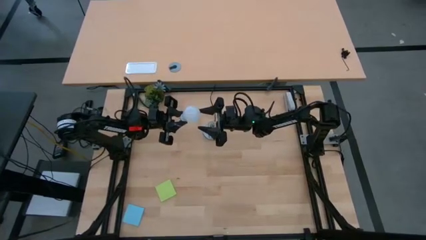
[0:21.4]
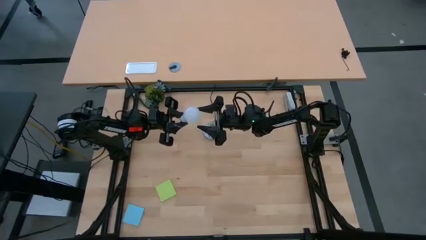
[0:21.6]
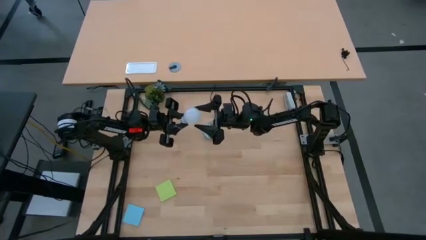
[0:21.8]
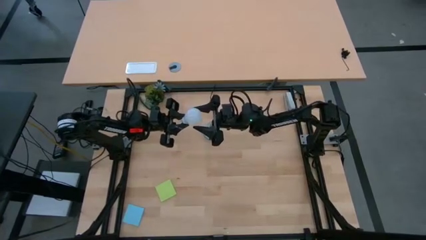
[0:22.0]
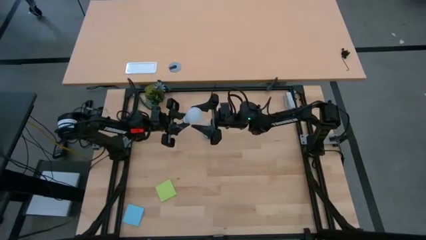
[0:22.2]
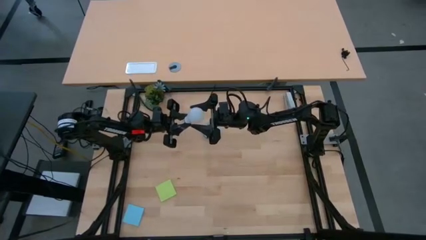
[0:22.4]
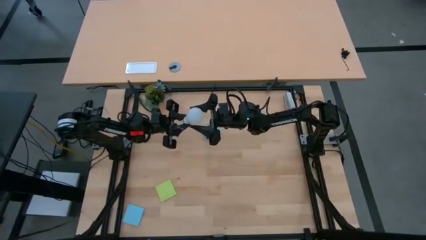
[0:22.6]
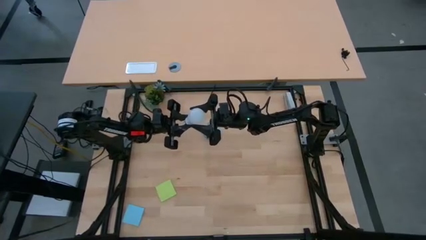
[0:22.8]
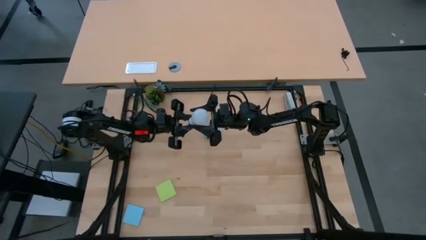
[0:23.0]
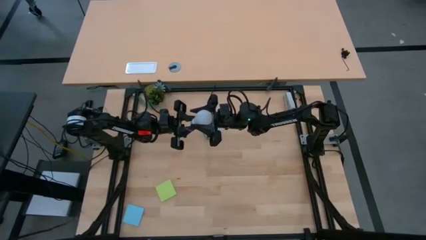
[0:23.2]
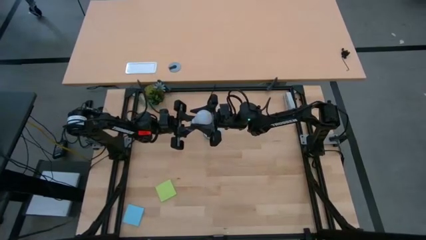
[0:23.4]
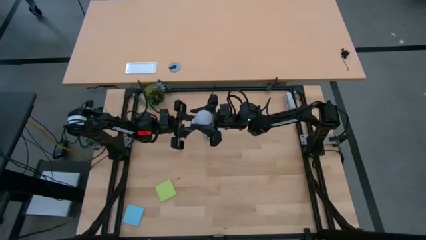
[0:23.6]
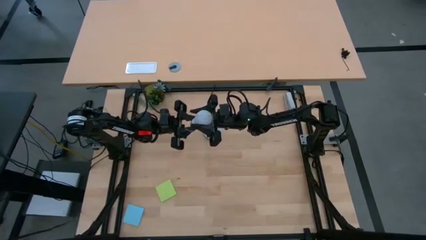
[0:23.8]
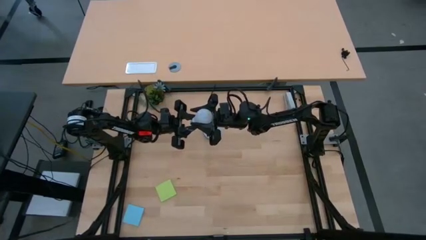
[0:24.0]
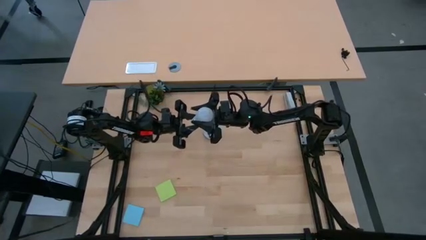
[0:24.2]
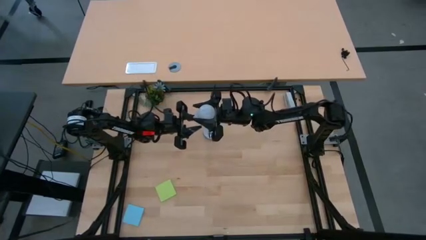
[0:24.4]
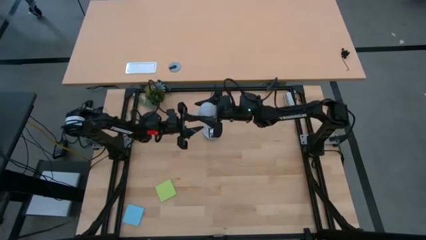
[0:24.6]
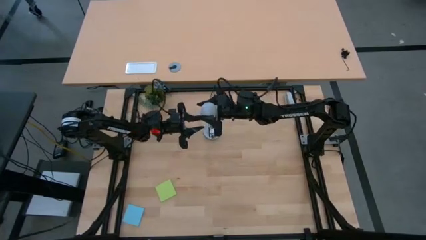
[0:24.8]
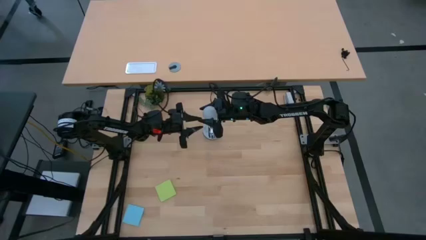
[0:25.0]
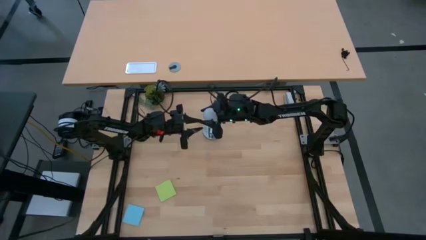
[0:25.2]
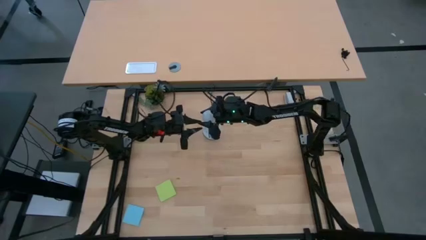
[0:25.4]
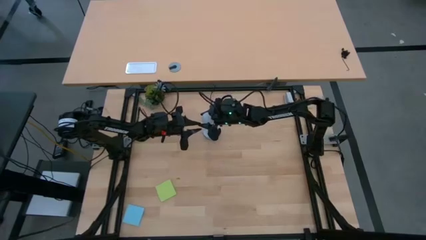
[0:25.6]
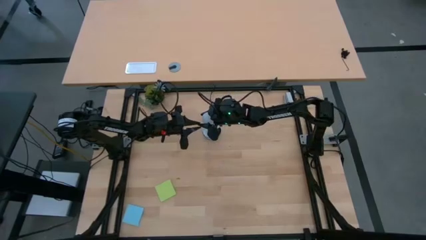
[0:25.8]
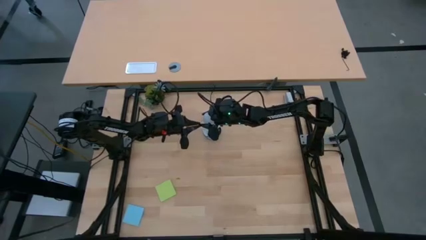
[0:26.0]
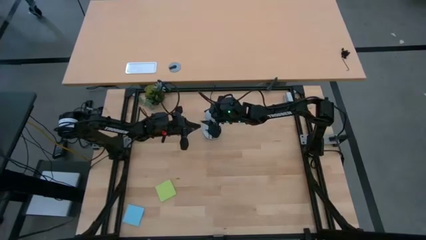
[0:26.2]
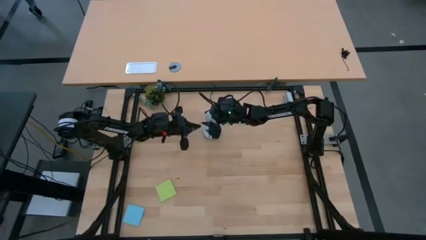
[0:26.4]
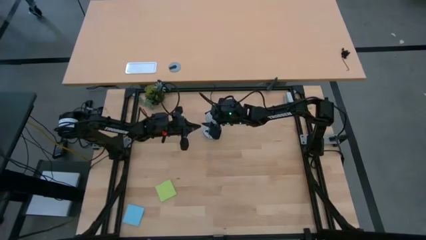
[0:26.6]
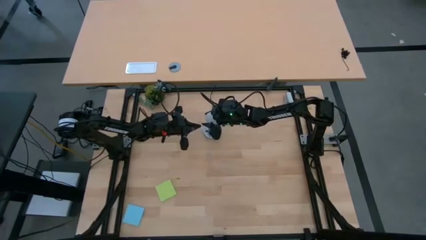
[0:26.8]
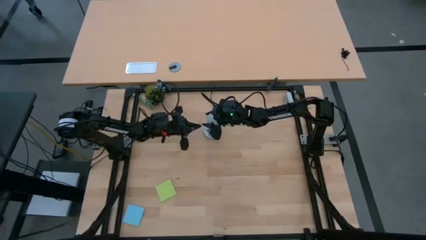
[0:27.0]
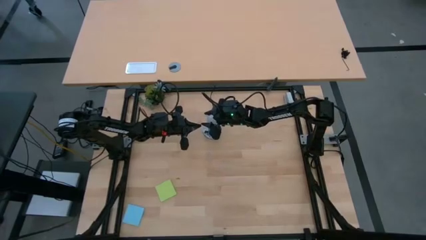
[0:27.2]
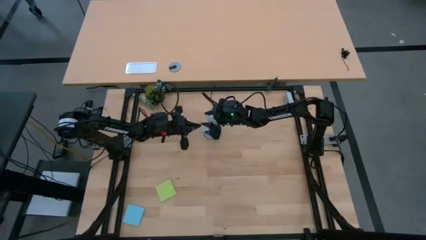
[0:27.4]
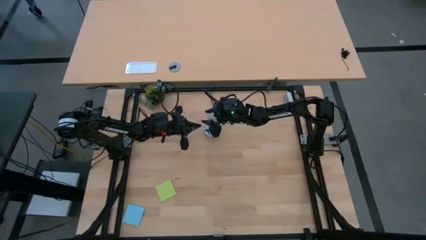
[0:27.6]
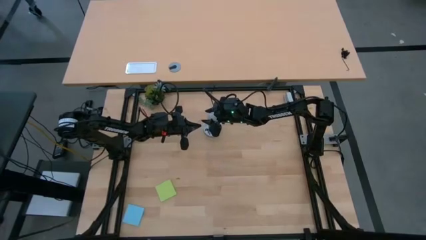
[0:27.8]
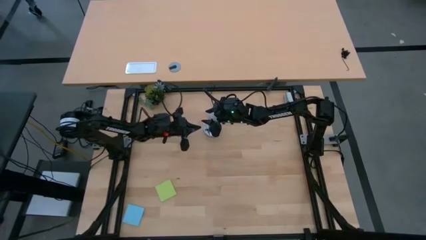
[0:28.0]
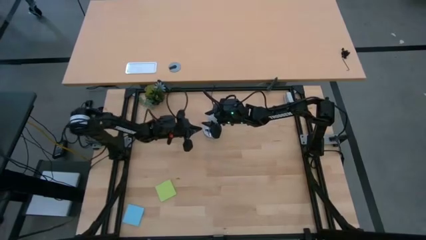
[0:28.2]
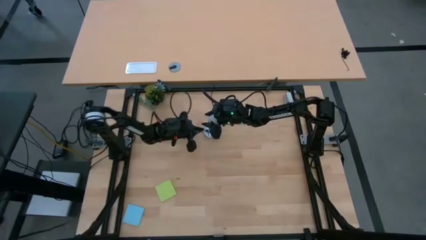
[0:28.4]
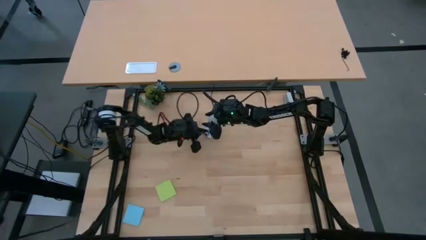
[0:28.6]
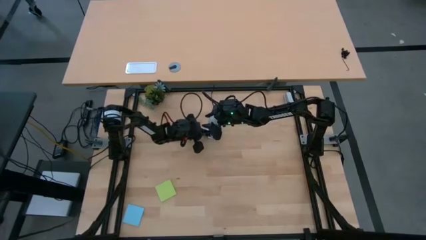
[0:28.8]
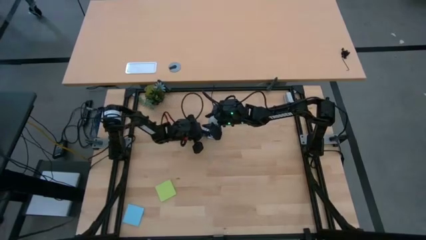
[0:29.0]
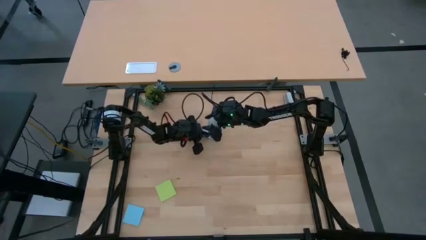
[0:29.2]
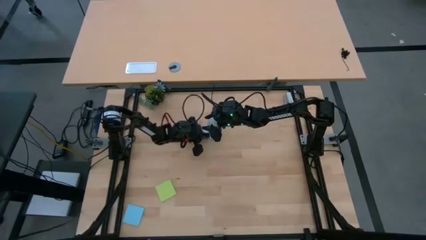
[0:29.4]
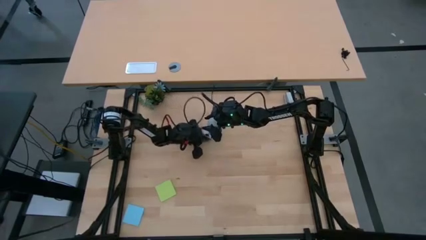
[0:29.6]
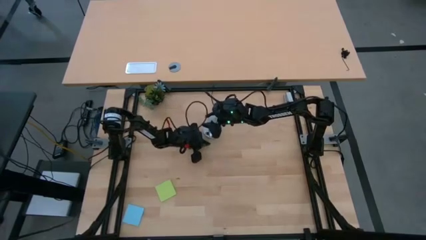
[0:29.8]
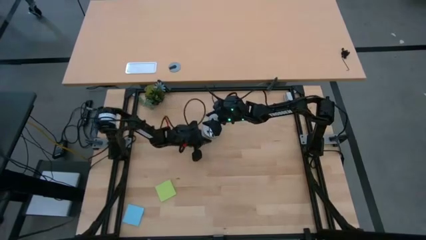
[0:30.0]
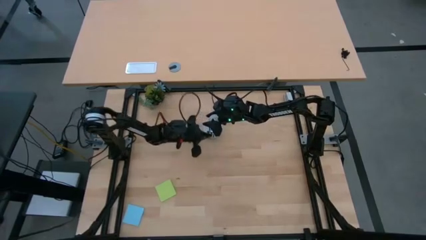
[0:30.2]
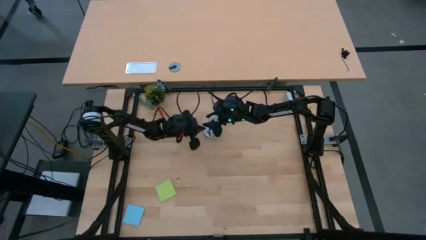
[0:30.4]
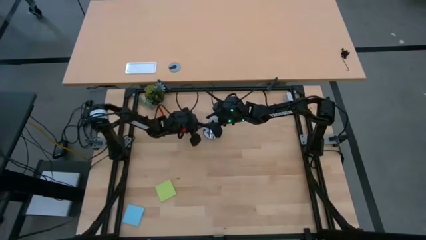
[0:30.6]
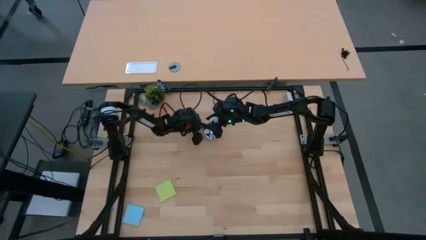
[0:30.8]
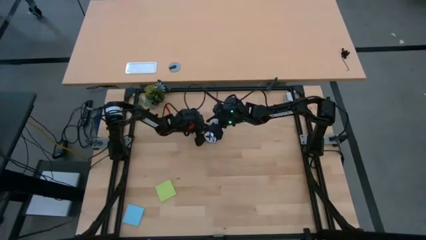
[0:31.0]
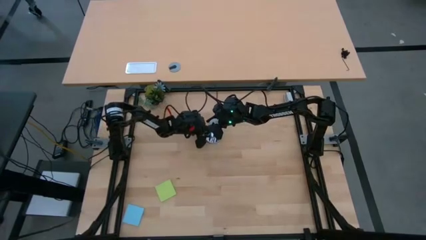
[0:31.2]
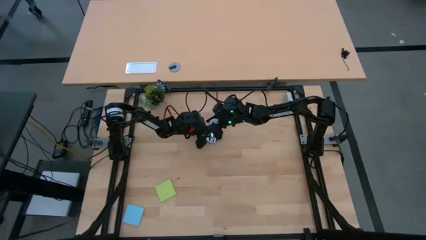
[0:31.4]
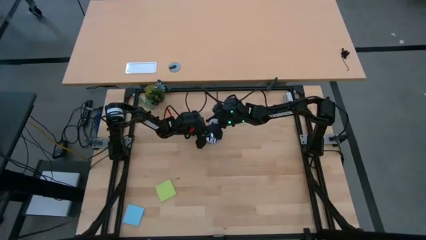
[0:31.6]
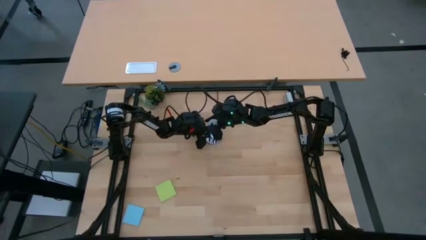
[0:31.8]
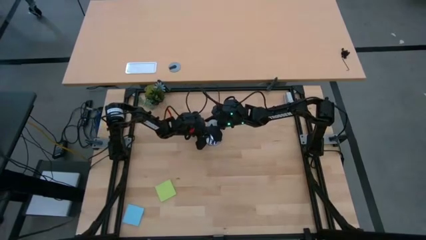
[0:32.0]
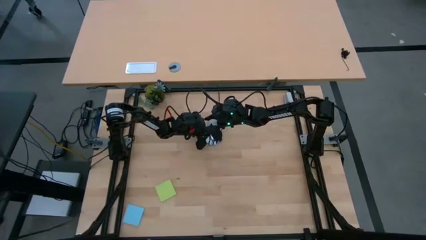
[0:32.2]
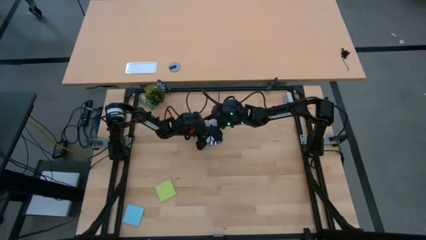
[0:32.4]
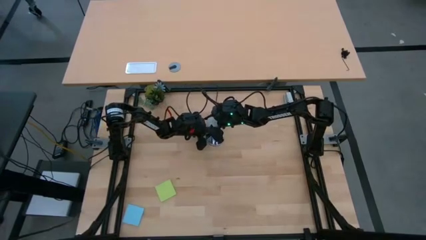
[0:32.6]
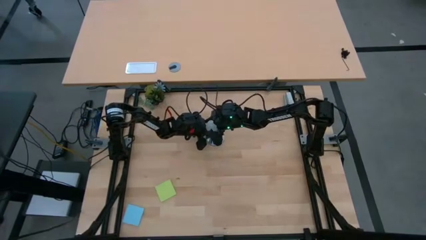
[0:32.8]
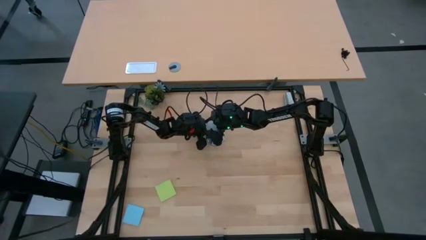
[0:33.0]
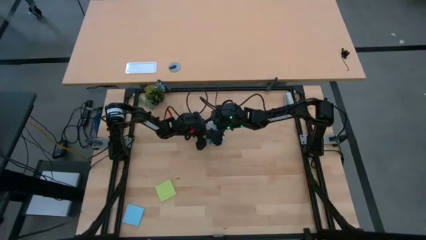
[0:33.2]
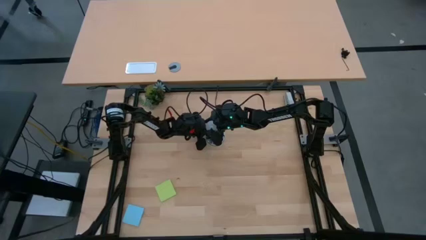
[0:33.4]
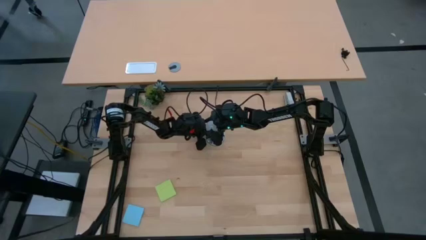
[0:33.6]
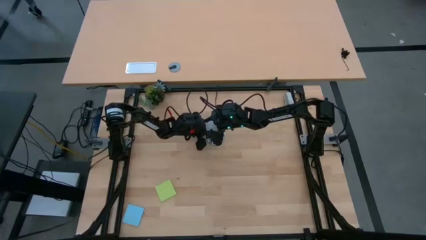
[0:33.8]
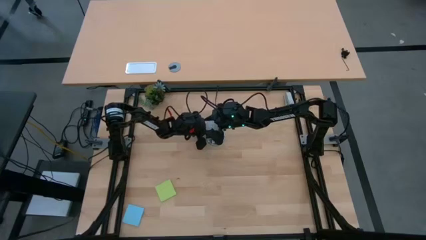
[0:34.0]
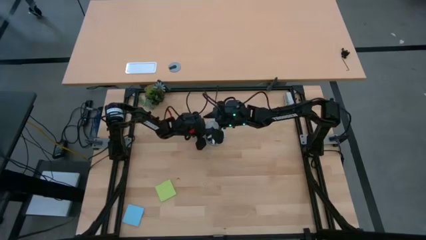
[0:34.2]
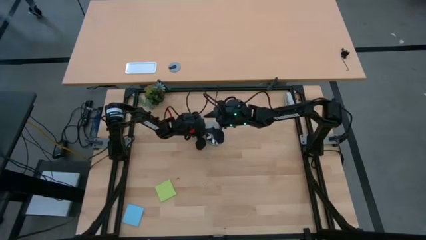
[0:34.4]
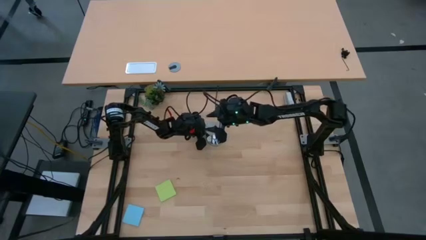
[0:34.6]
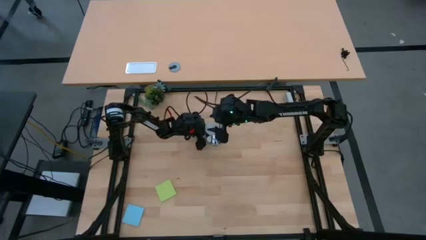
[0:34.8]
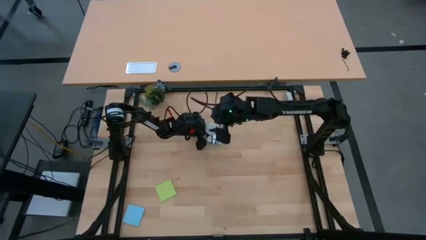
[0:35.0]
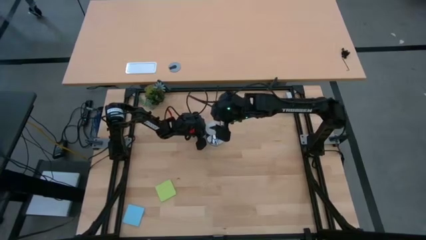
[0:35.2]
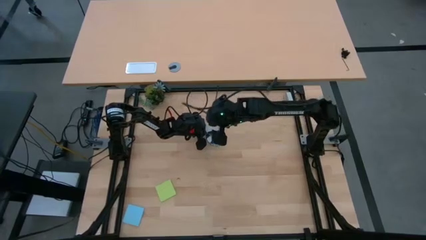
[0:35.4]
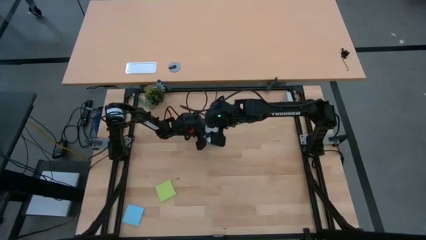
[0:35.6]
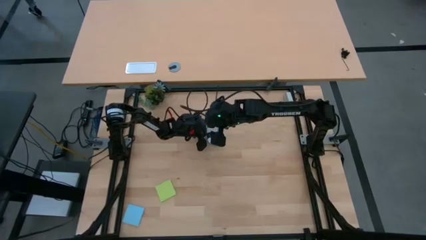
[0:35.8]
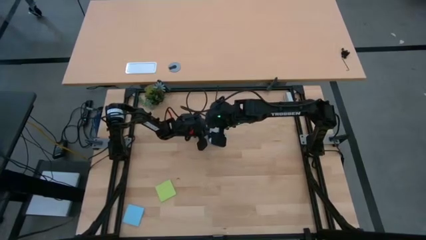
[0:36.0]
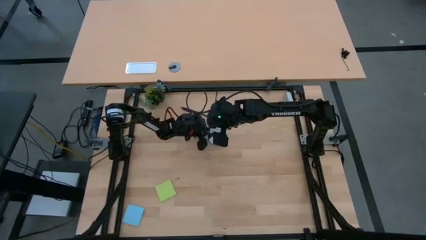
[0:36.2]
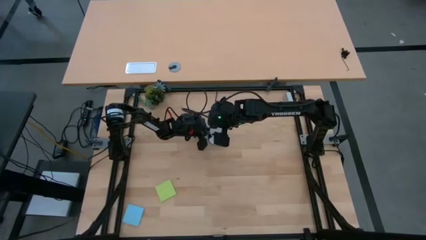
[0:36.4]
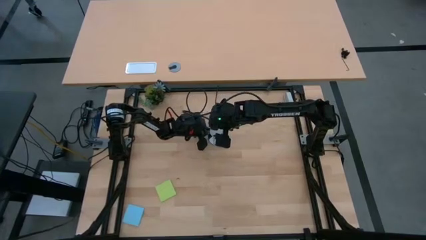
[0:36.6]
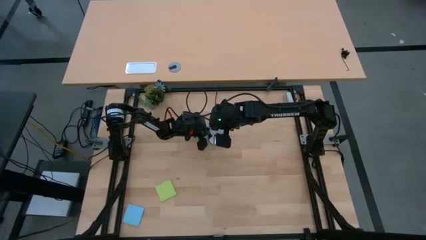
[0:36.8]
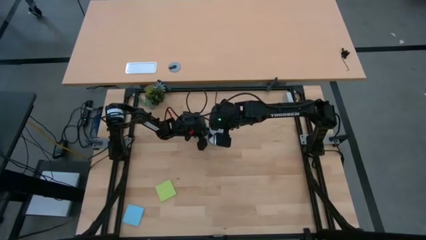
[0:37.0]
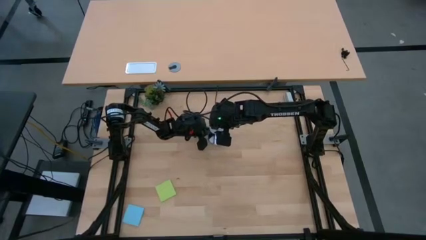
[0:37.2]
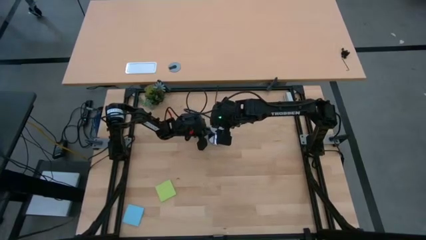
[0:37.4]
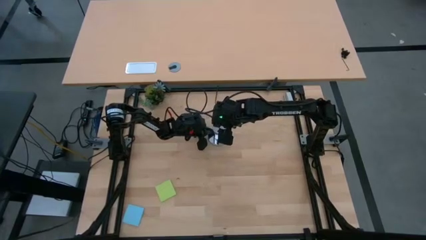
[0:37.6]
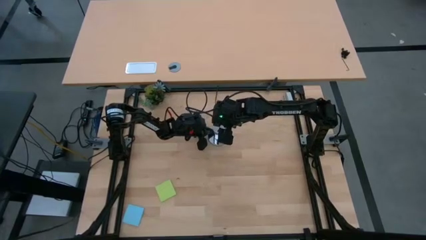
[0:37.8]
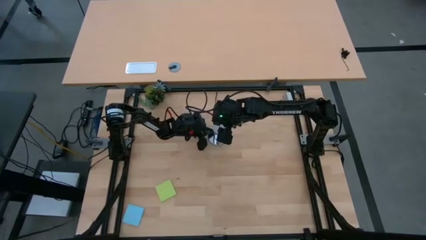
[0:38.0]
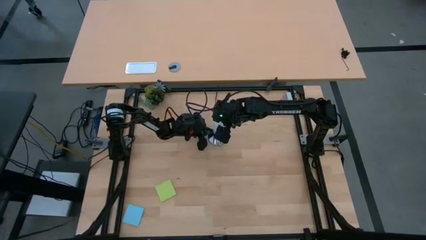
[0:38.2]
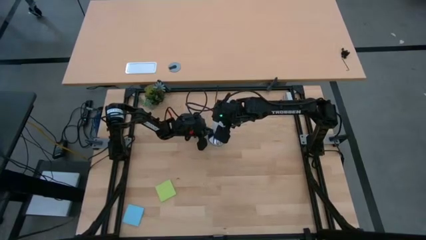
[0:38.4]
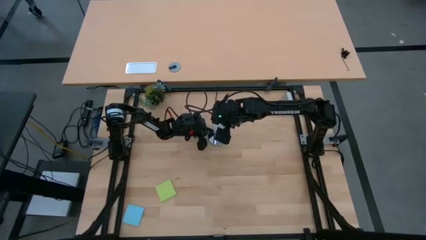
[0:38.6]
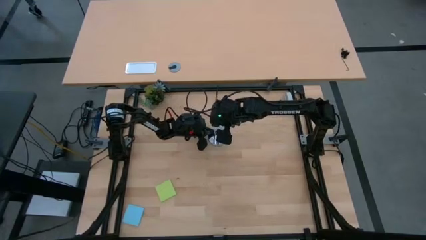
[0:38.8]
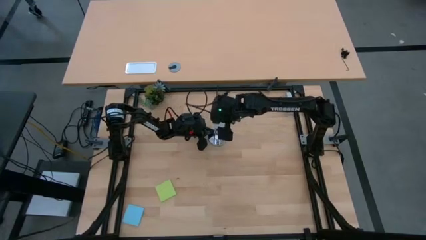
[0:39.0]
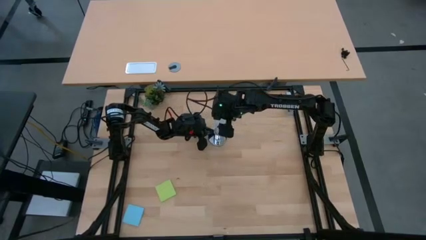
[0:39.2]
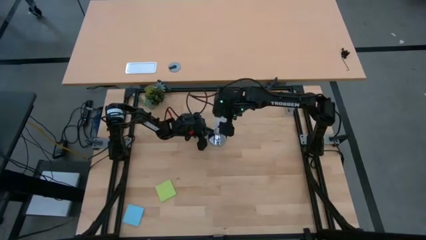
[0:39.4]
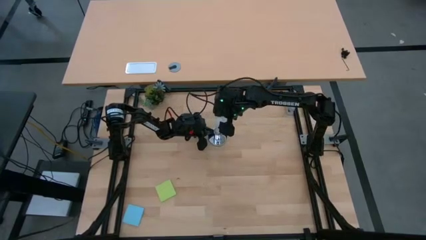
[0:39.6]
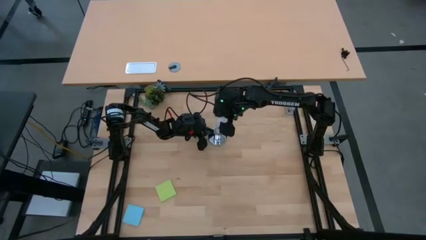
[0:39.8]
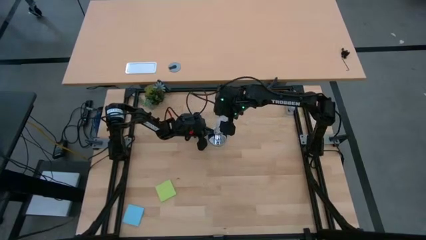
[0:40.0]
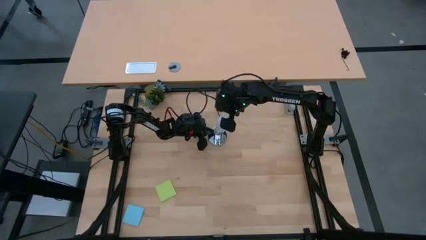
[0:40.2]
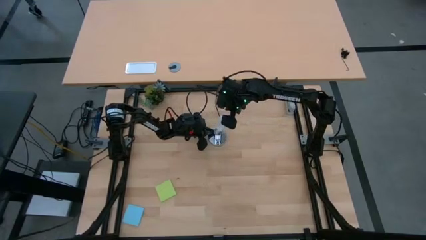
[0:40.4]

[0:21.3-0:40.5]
Task: Screw lightbulb
Insert the lightbulb into the lamp
